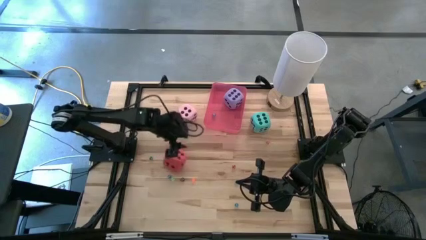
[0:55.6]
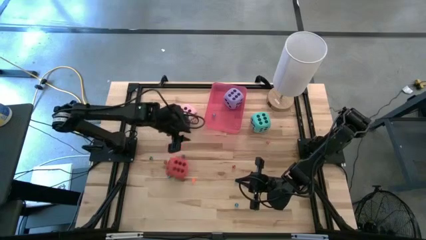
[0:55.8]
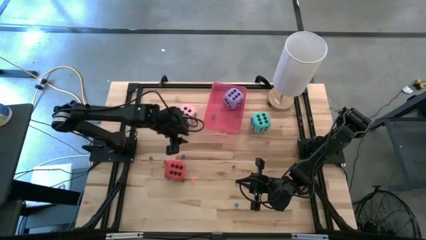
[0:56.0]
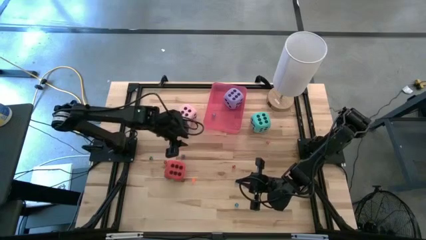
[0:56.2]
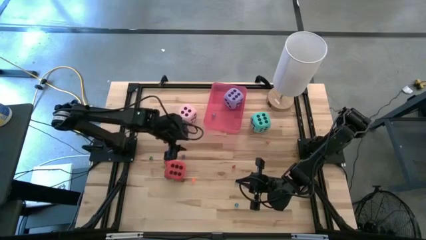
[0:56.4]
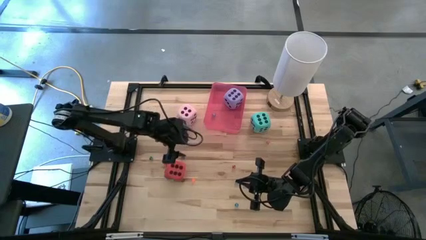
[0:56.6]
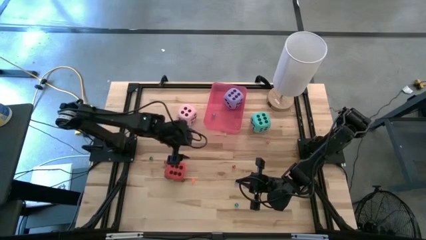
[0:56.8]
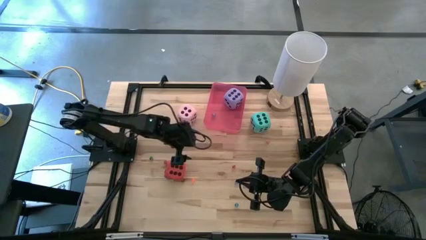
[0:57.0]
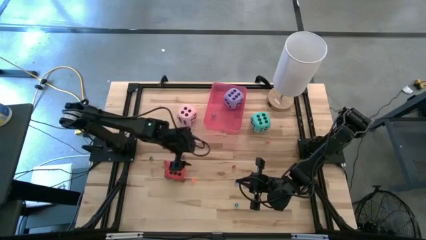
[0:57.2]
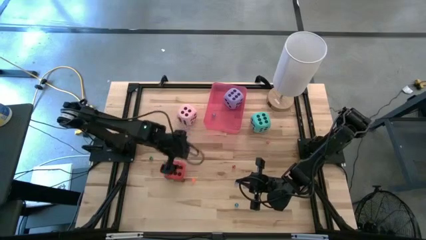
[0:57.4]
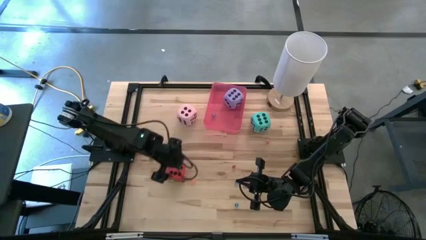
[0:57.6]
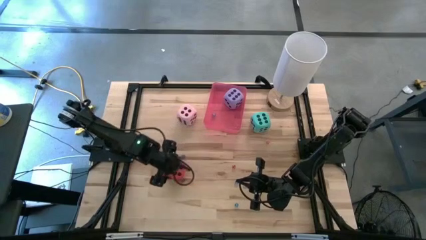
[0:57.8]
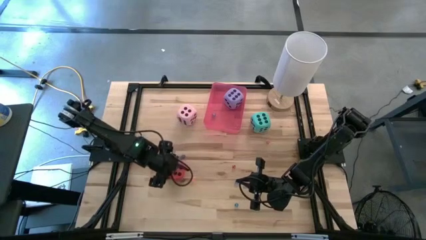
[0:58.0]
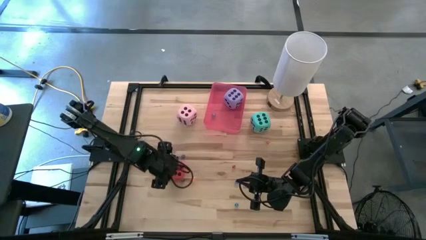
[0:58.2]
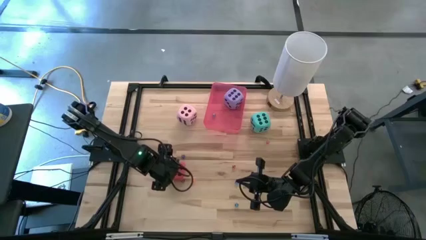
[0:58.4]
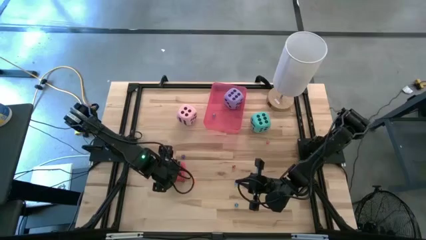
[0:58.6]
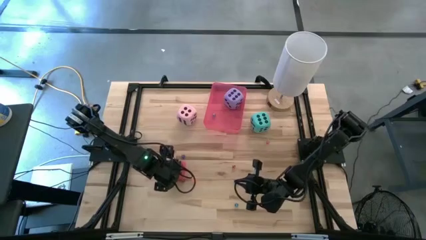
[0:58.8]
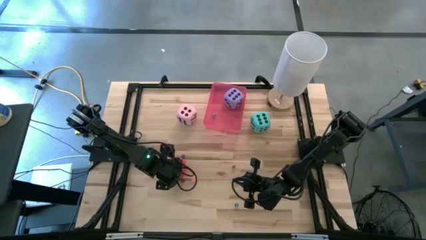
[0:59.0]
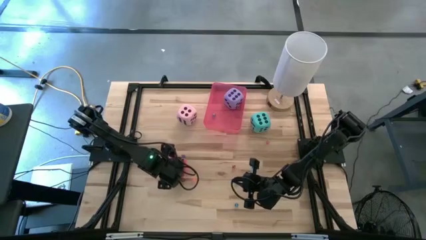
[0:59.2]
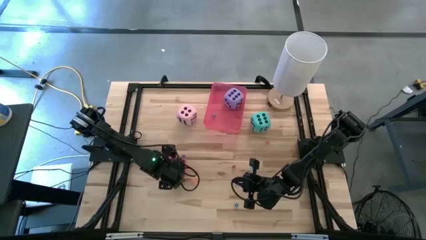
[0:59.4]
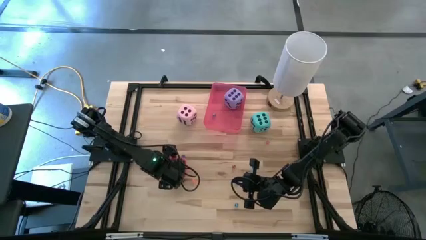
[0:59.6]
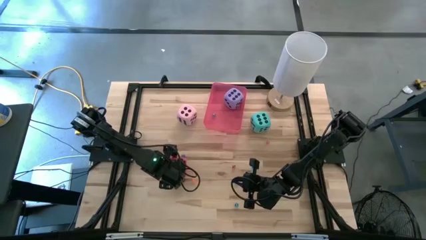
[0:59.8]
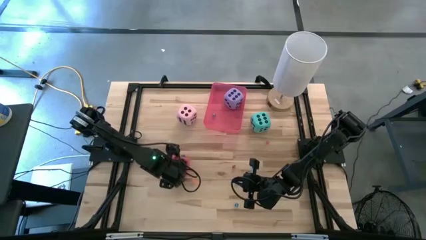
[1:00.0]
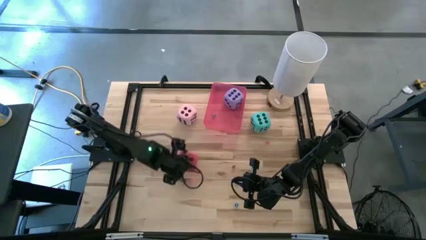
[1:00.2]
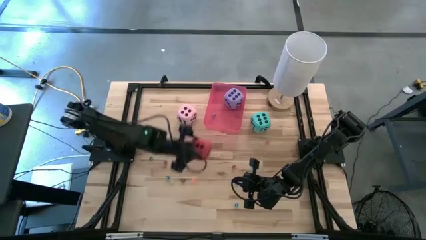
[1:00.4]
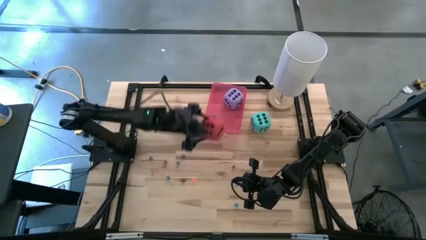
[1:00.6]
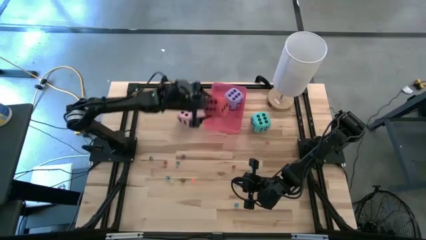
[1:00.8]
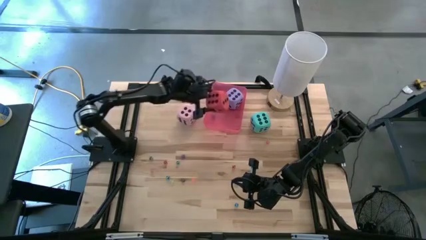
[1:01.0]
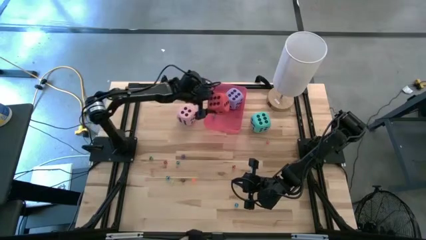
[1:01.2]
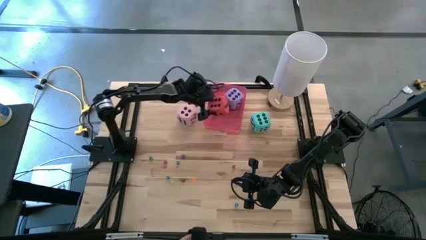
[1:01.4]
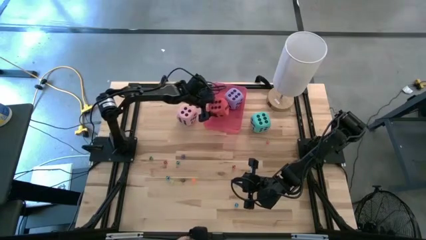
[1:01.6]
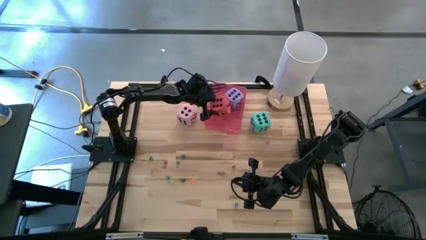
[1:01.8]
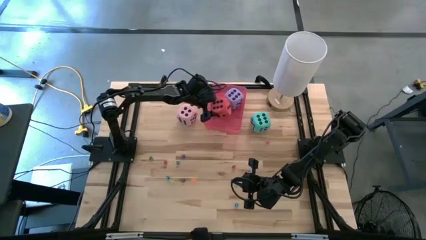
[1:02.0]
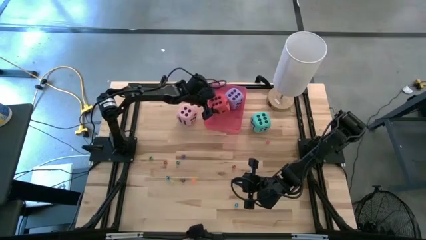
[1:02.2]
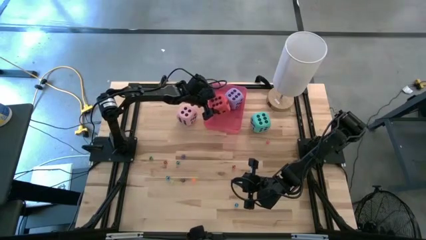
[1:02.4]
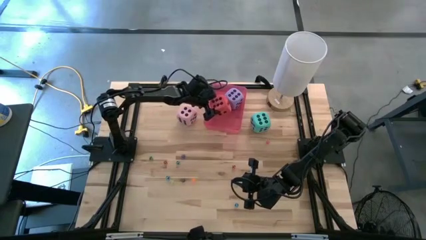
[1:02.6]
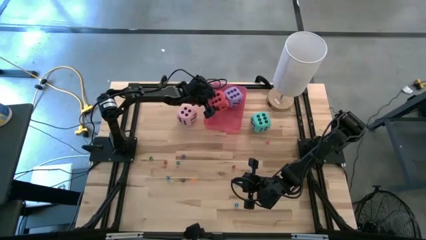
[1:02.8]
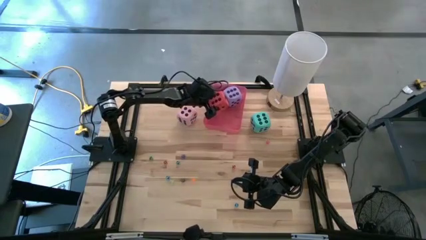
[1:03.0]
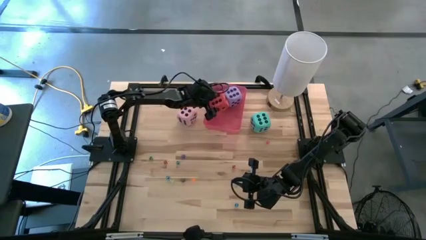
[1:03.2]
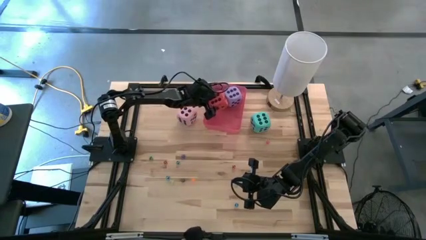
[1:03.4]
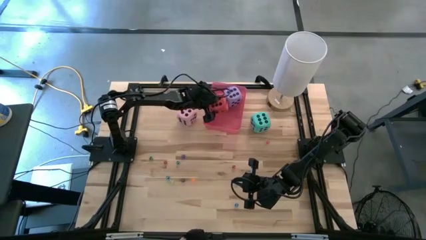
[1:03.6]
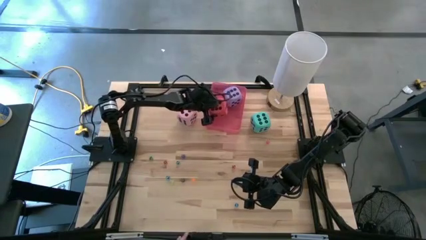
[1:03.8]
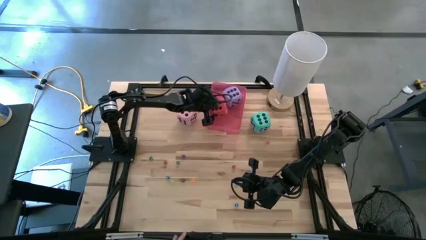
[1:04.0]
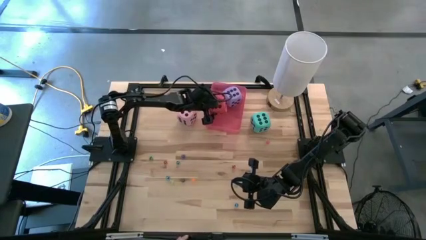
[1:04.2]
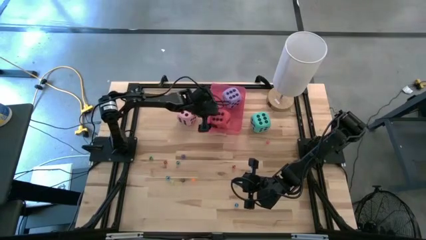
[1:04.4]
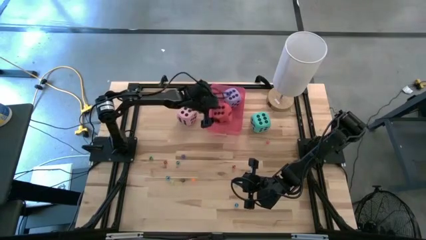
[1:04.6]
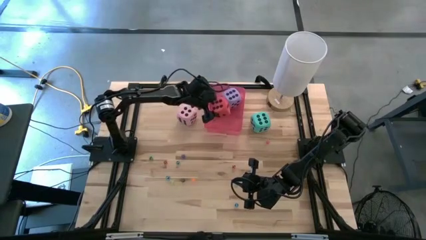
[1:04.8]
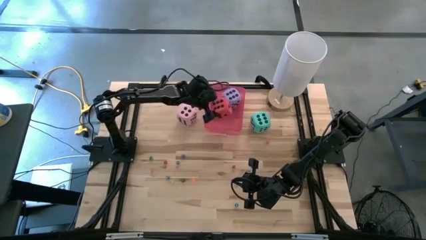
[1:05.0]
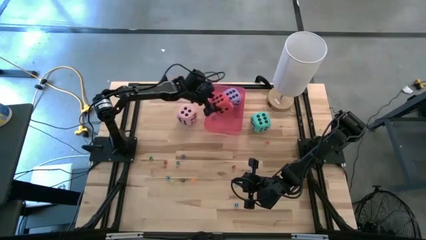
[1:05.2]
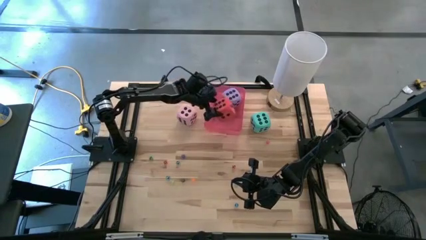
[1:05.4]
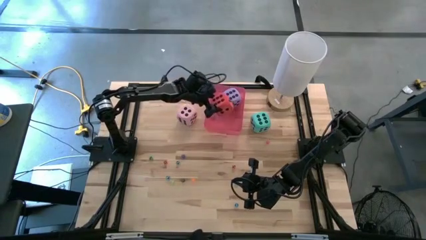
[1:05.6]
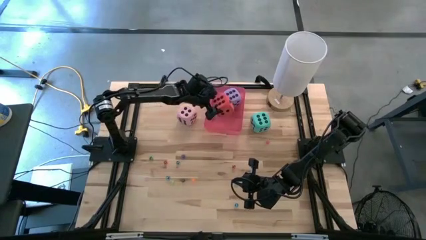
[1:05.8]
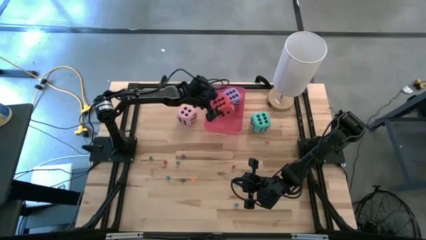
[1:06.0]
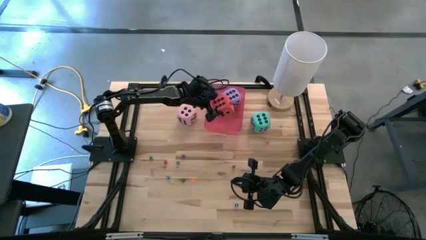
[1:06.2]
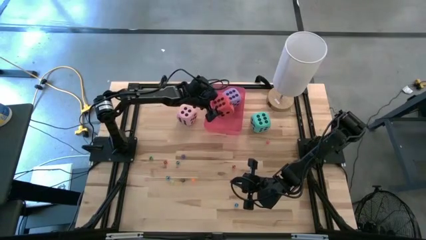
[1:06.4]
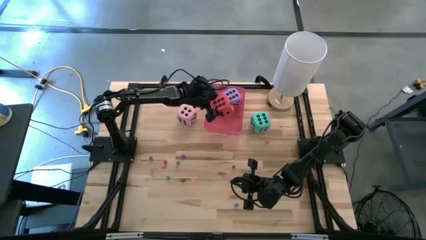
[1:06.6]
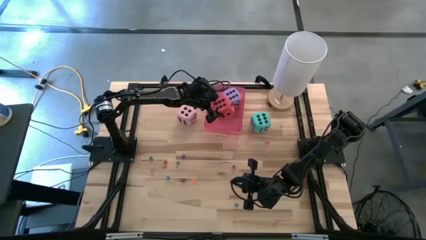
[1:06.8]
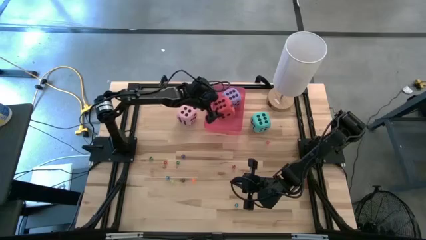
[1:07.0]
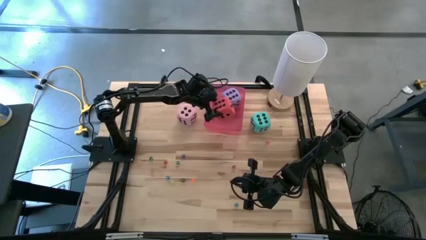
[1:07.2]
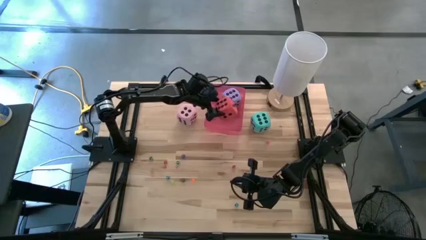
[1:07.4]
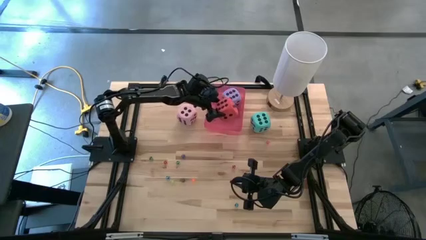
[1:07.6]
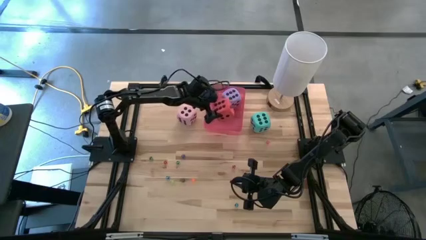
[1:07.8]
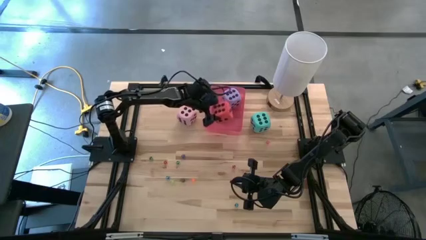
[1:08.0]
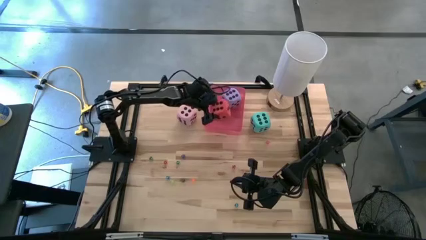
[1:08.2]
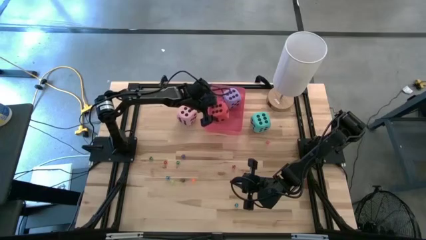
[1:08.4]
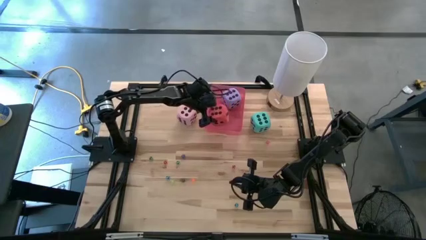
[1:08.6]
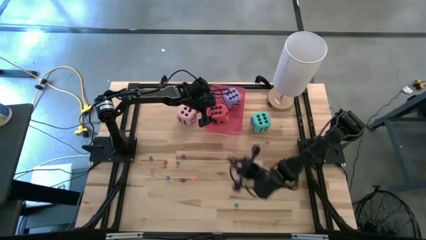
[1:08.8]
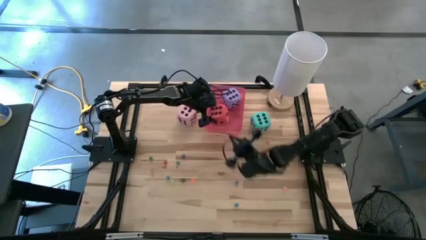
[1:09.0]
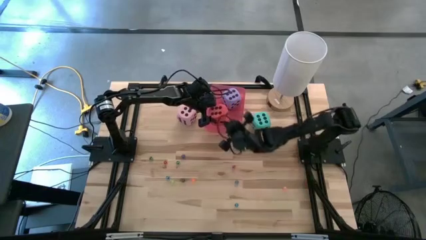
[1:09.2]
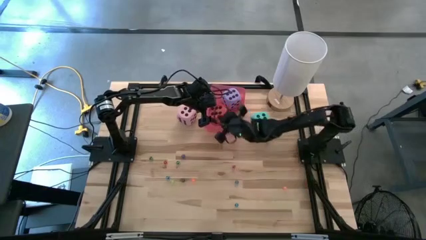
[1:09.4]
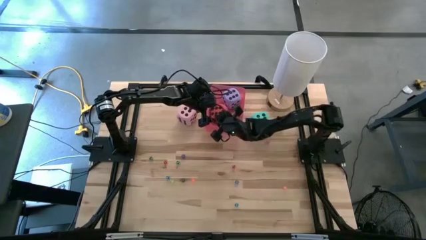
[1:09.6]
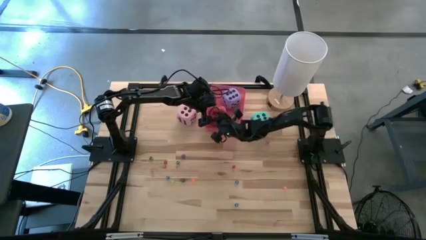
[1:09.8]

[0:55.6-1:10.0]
Task: Pick & Place Dice
Put the large red dice into the bin
